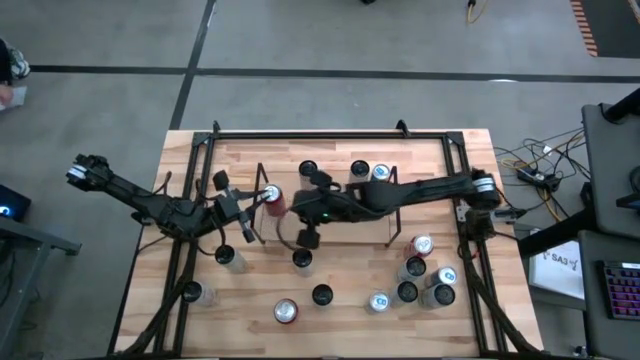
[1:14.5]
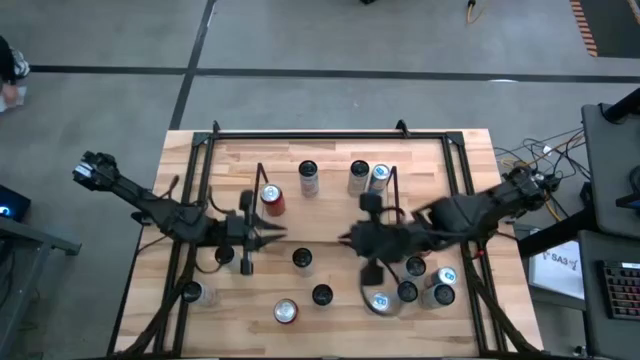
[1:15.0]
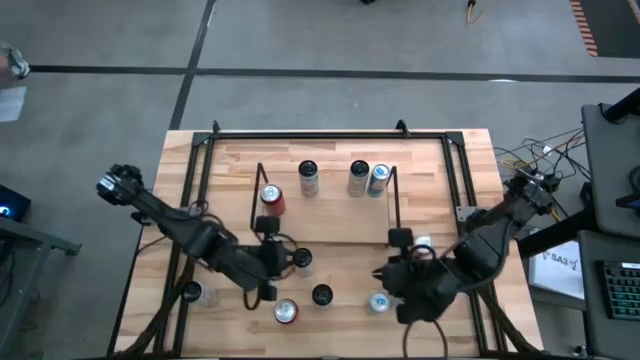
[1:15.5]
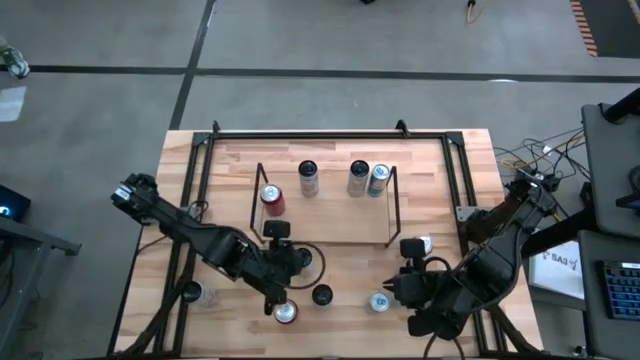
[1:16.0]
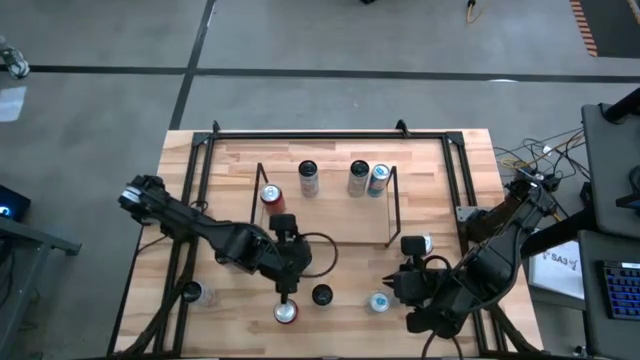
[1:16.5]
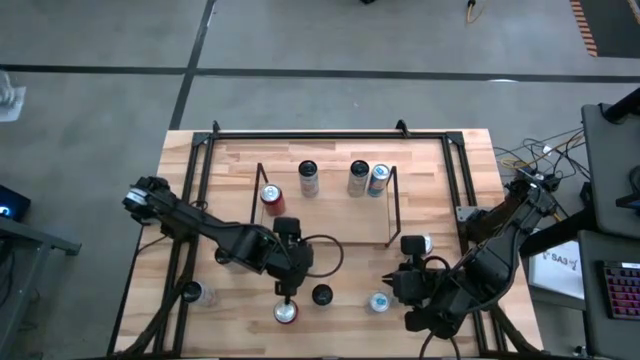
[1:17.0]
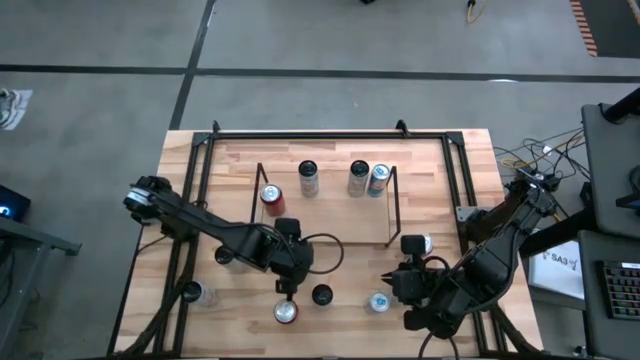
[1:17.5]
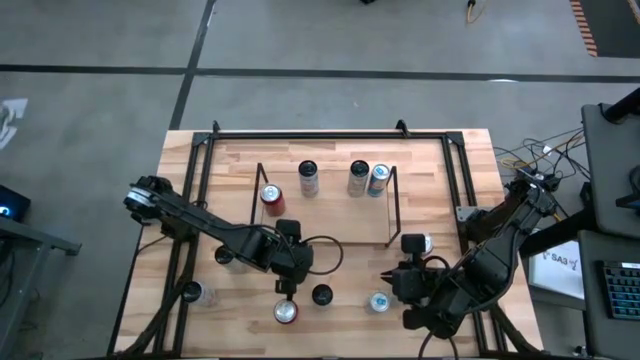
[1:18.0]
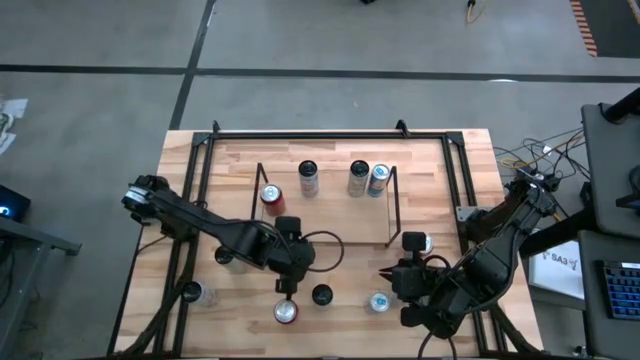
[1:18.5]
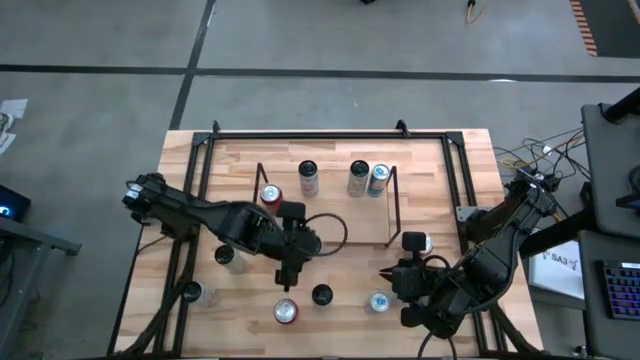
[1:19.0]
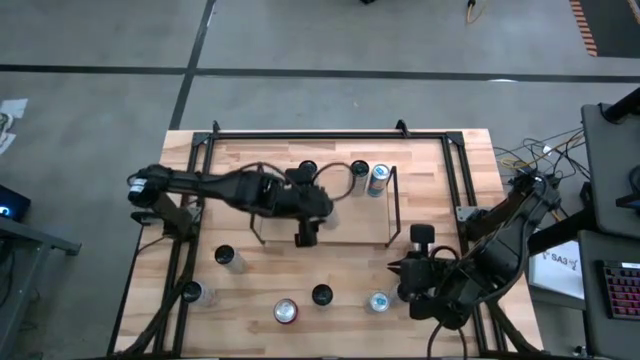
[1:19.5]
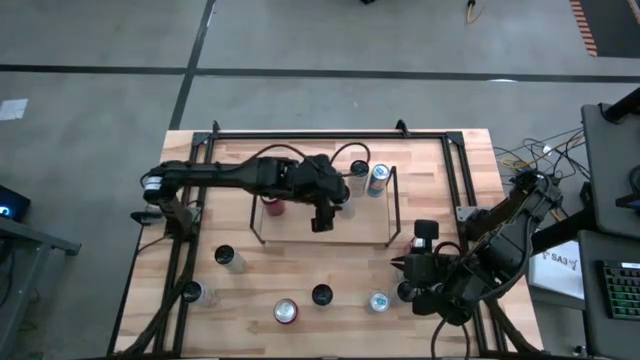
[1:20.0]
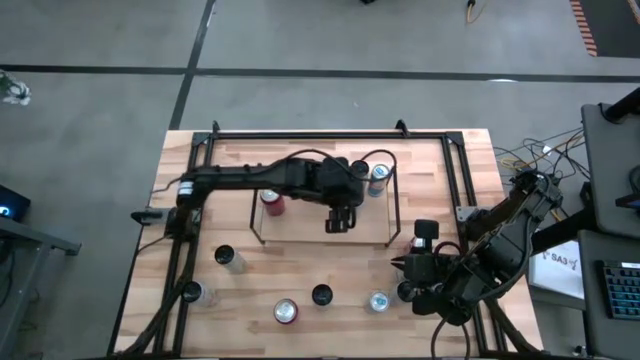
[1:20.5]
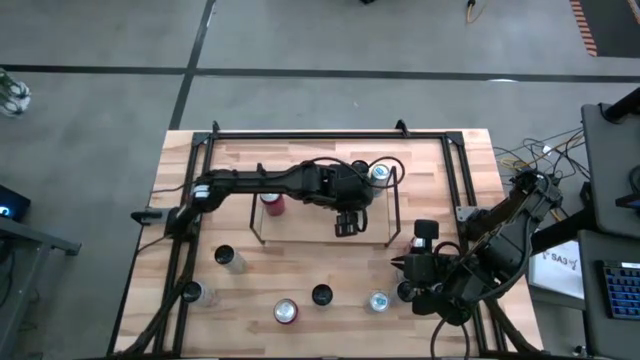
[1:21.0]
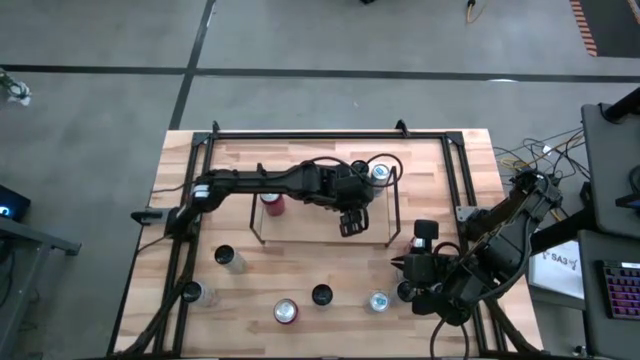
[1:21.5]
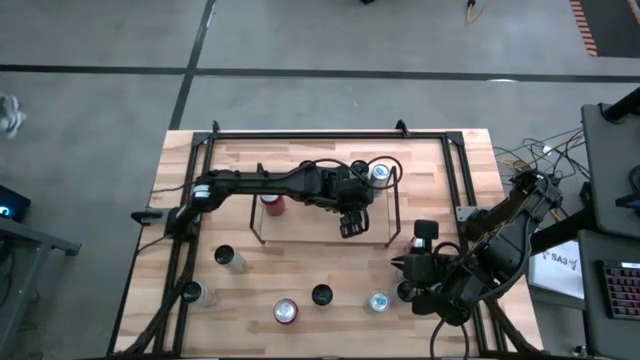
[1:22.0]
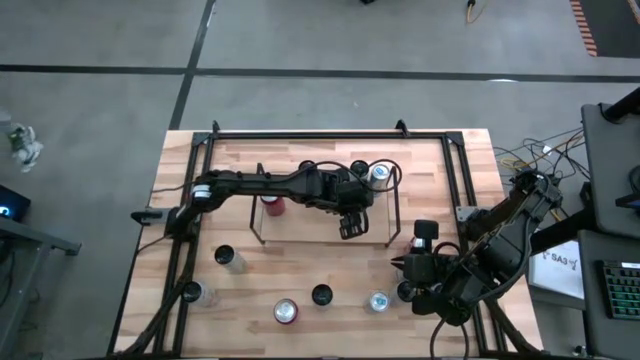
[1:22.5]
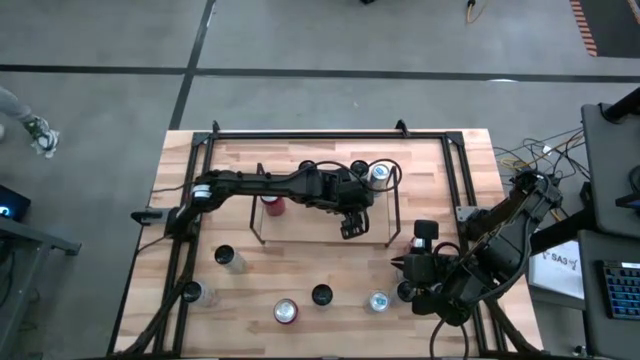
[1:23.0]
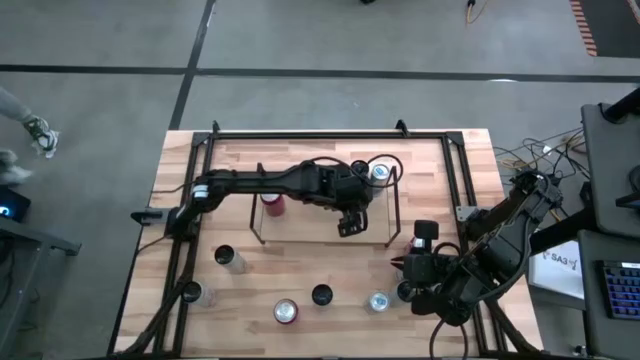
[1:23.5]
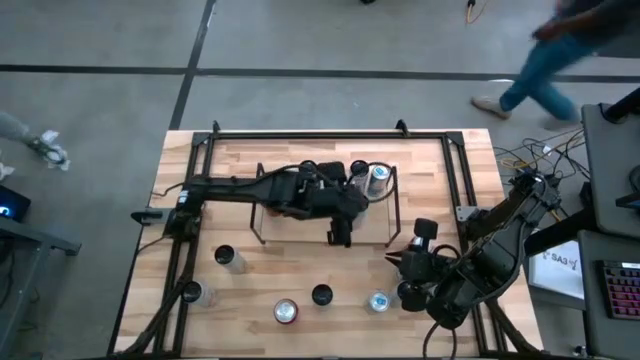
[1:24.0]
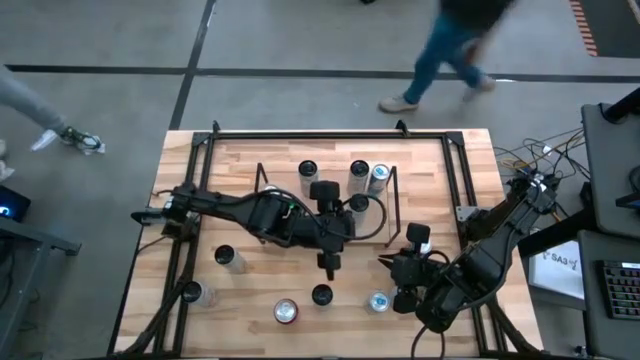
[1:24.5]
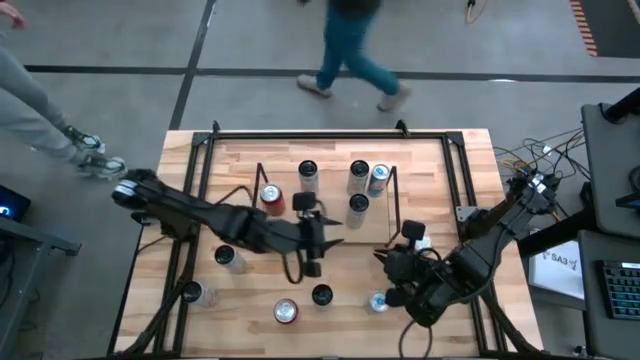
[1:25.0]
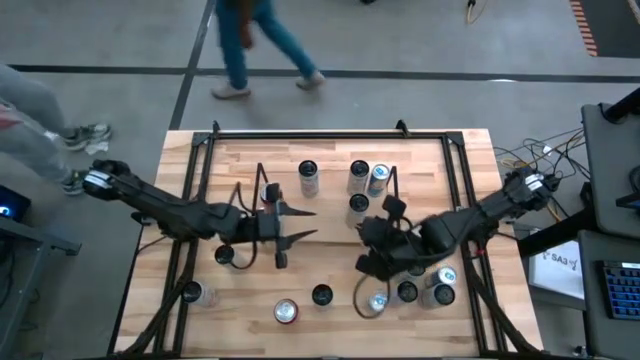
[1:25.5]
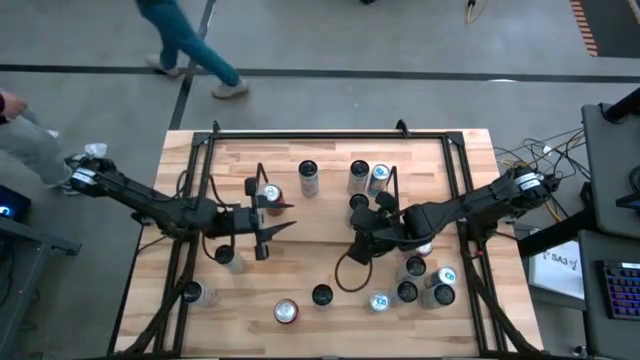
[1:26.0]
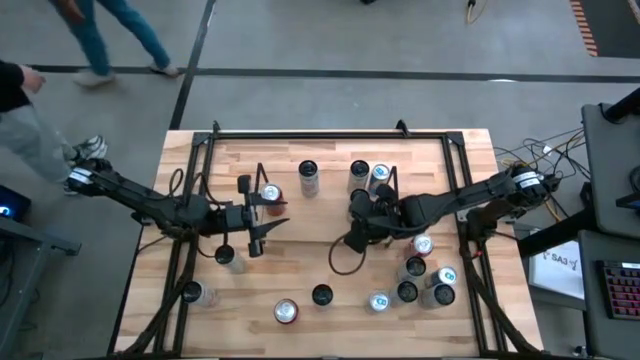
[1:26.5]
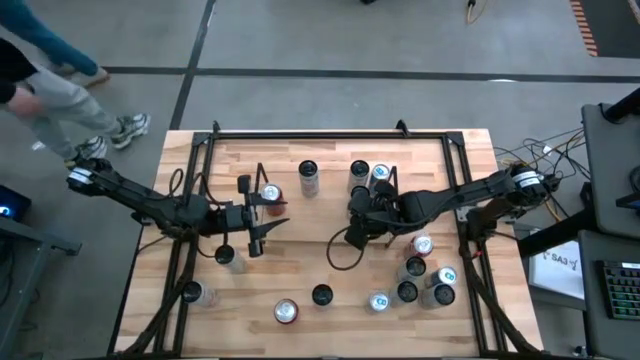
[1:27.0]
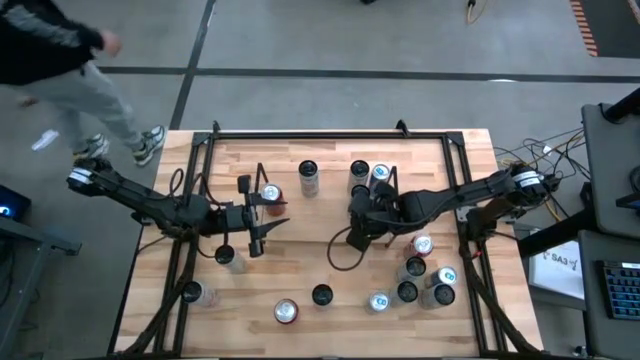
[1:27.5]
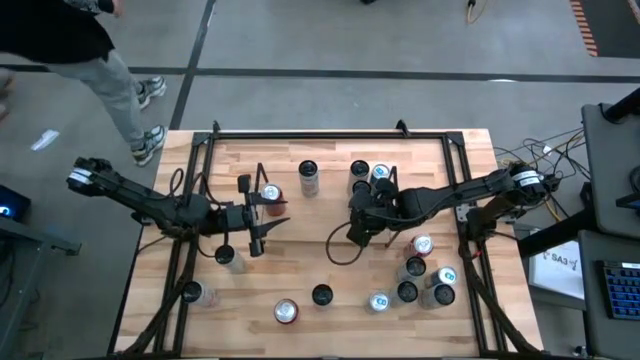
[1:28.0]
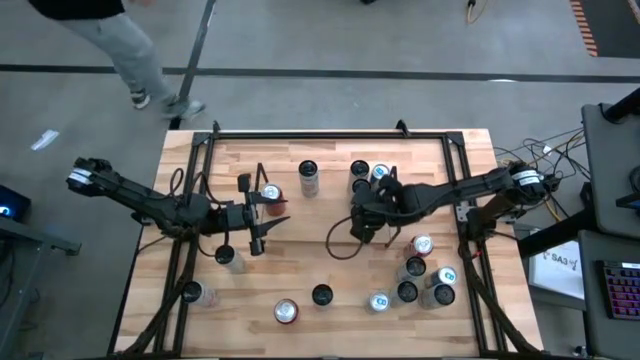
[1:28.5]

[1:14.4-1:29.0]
Task: Place canned beverage on shelf
Put the right white and yellow soda can on the shelf aligned with the other white and yellow soda can

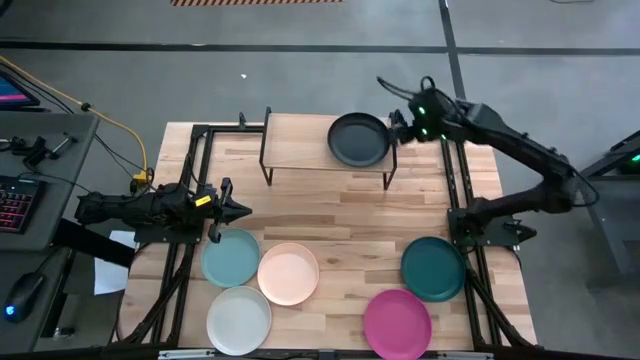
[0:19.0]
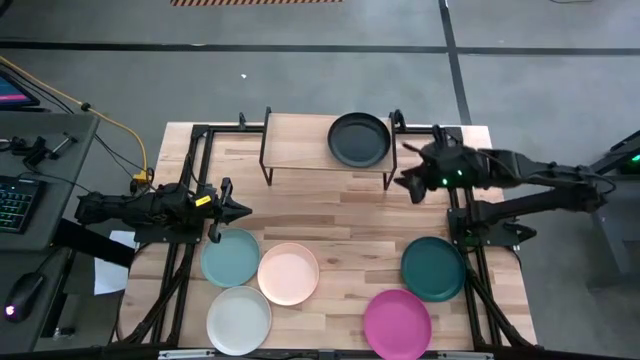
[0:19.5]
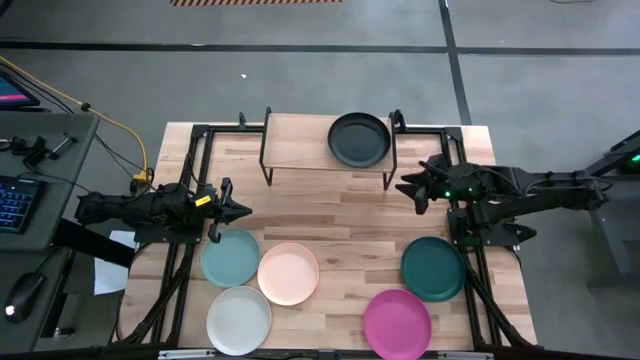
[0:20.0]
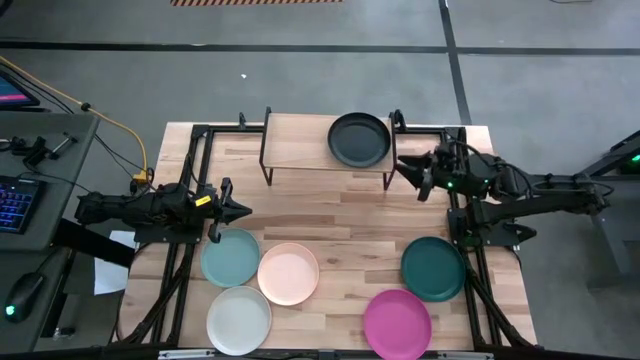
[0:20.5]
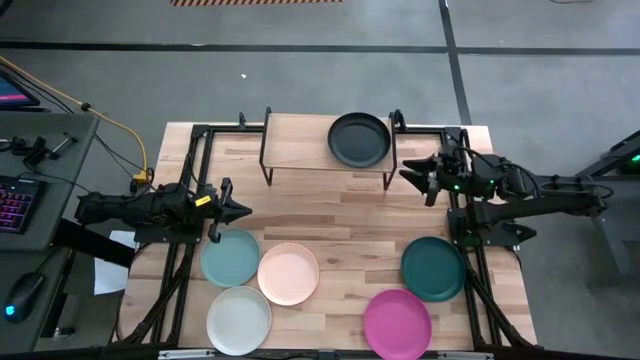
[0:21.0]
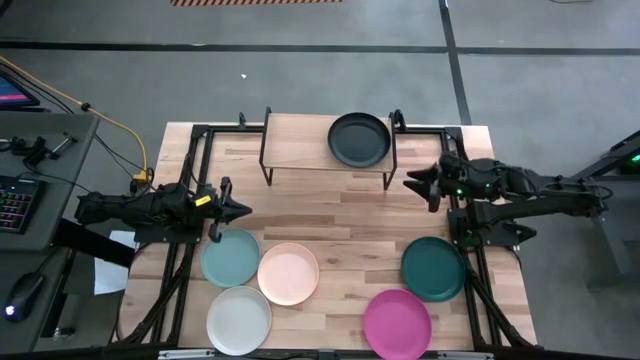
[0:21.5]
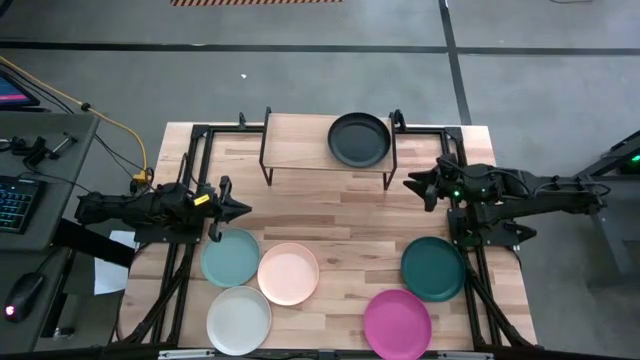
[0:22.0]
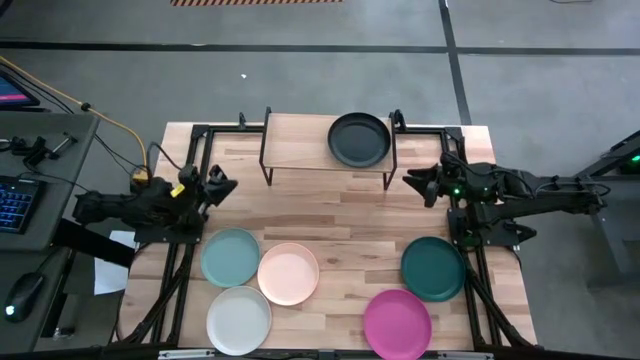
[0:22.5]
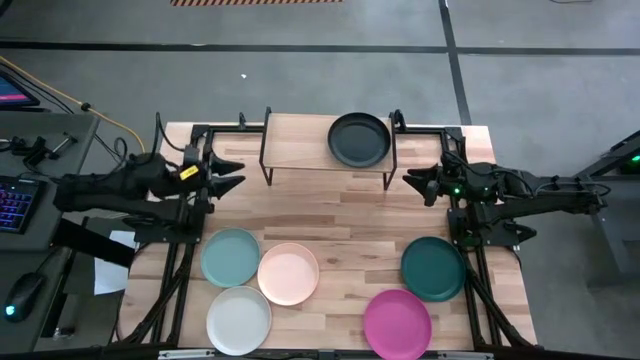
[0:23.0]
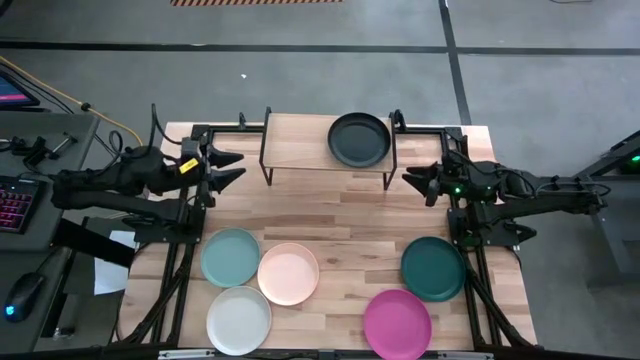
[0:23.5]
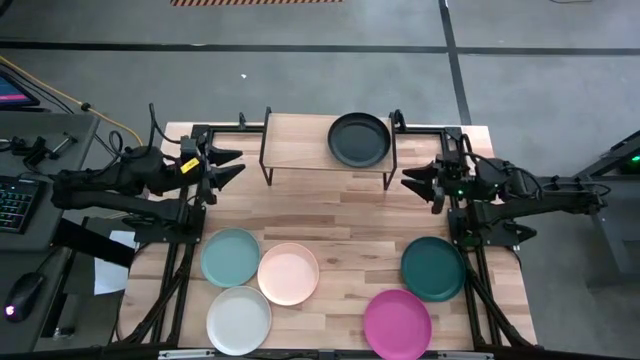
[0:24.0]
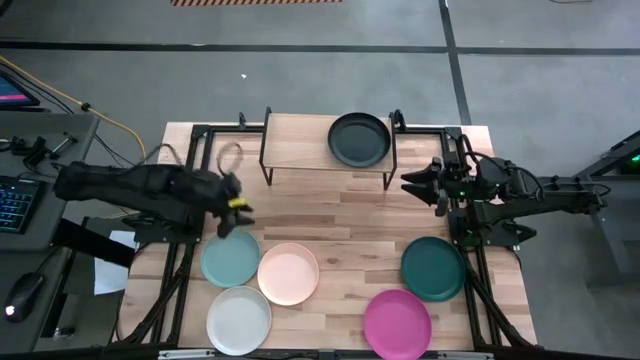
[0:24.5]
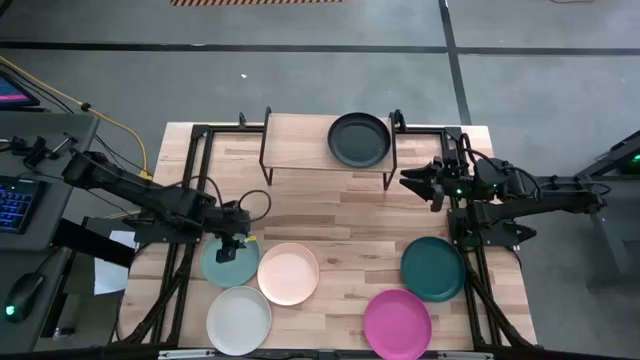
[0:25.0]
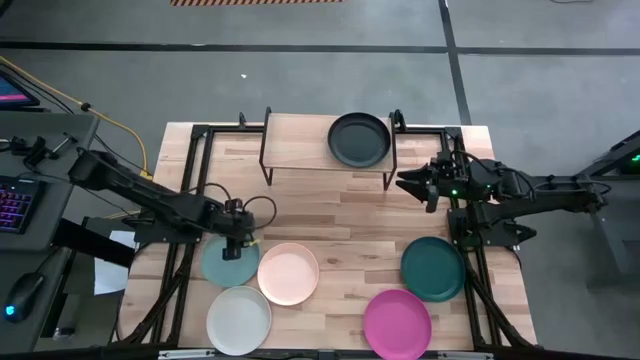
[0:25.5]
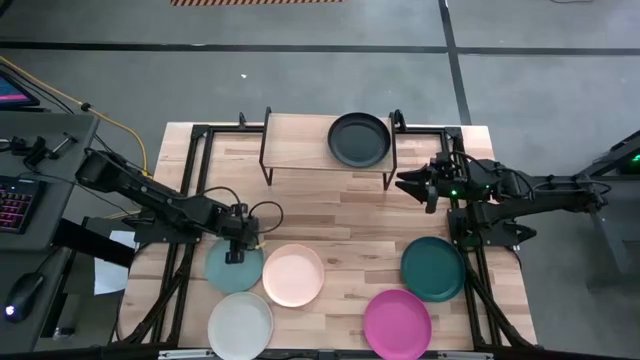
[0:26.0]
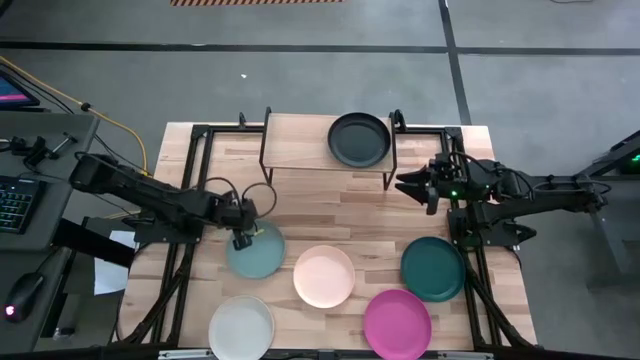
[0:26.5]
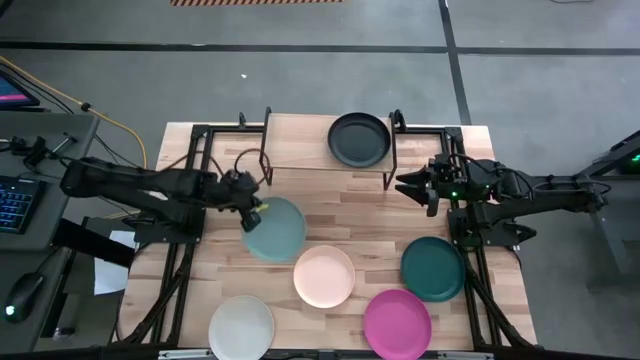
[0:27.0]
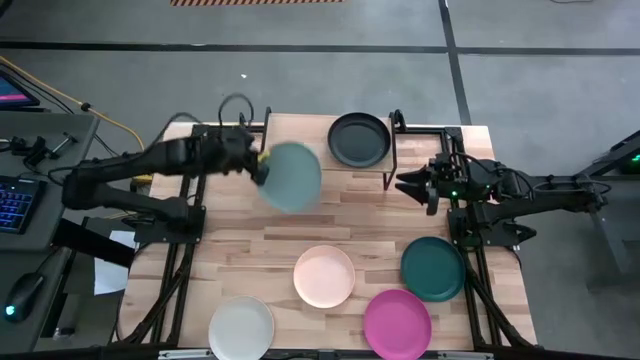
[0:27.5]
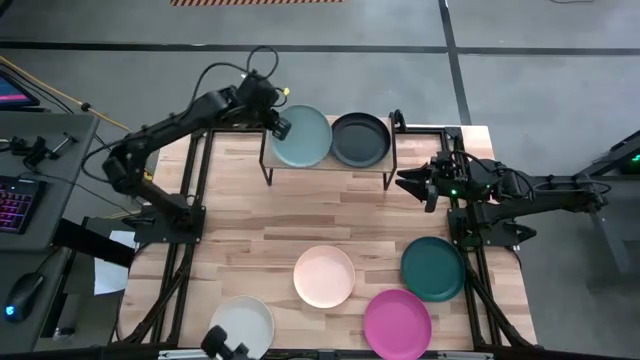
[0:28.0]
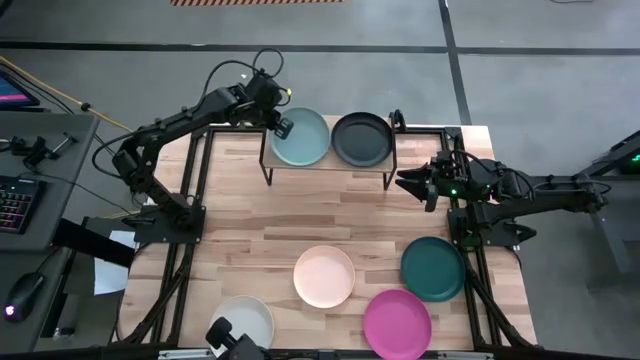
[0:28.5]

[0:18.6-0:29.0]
Task: Place and stack plates onto a shelf
Put the blue plate on the shelf
